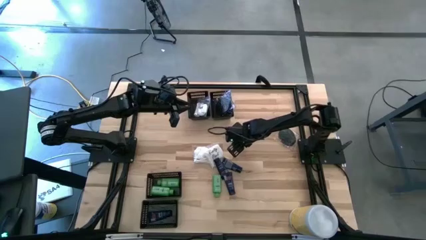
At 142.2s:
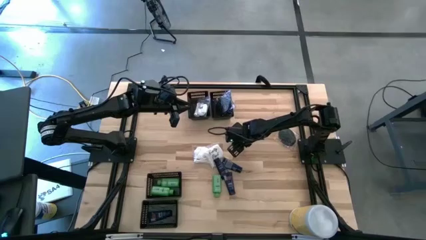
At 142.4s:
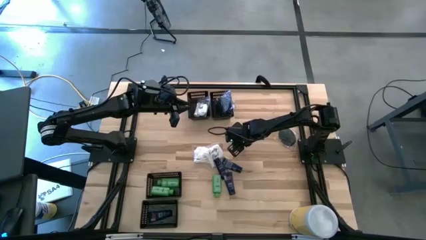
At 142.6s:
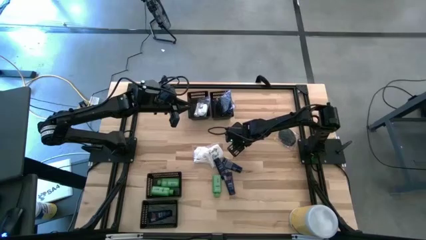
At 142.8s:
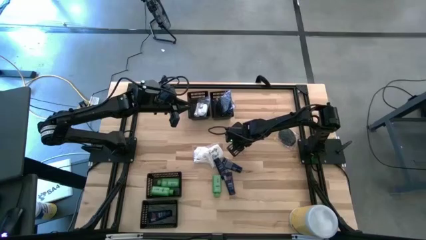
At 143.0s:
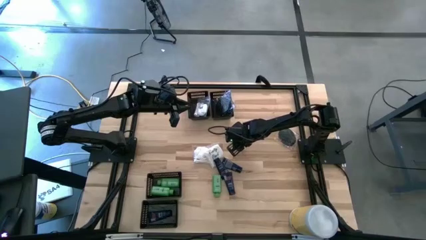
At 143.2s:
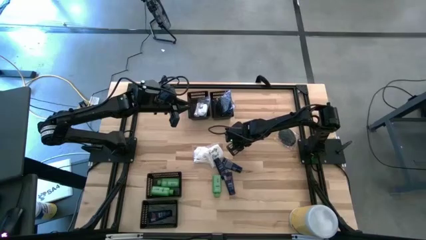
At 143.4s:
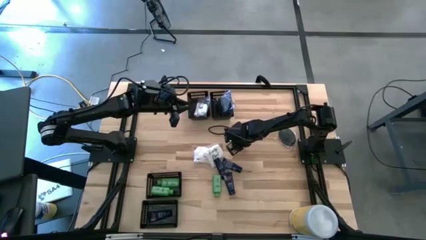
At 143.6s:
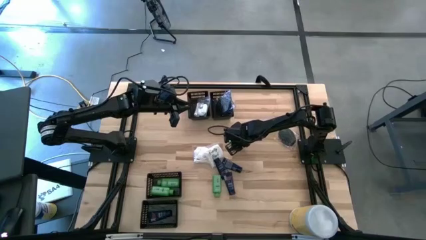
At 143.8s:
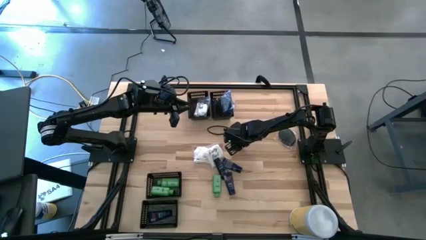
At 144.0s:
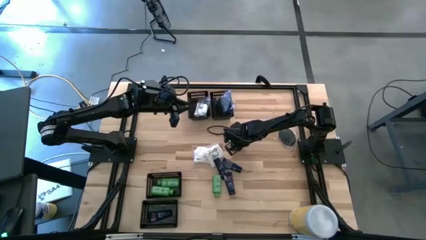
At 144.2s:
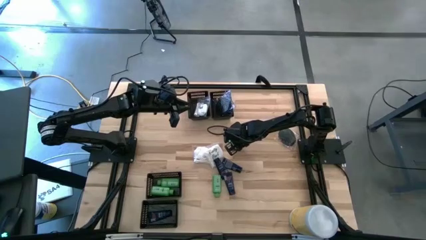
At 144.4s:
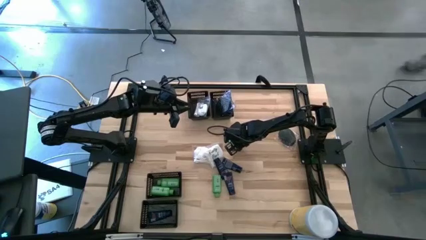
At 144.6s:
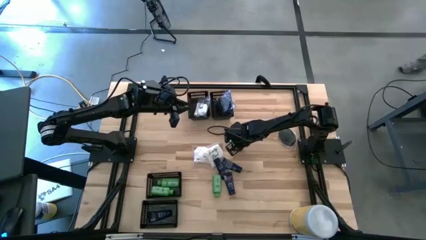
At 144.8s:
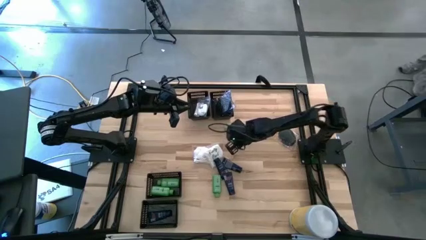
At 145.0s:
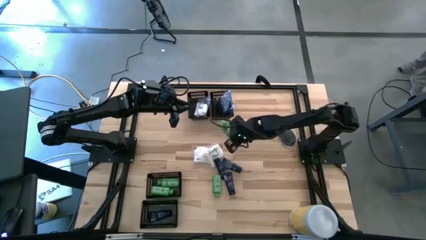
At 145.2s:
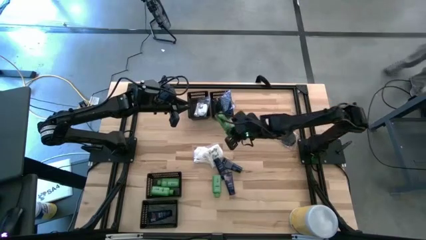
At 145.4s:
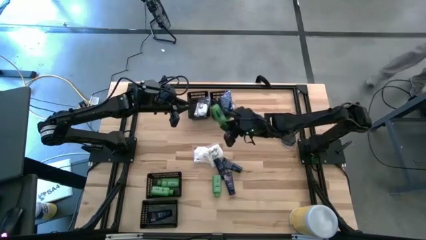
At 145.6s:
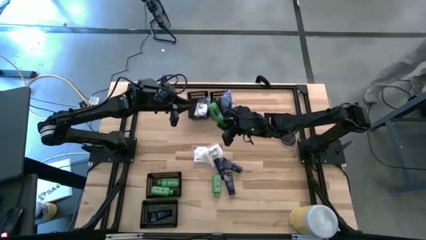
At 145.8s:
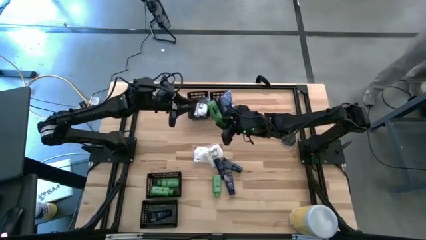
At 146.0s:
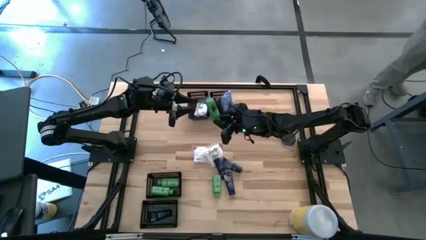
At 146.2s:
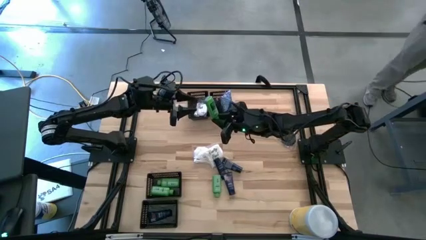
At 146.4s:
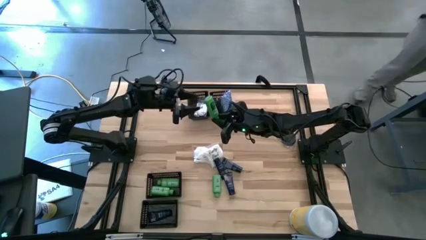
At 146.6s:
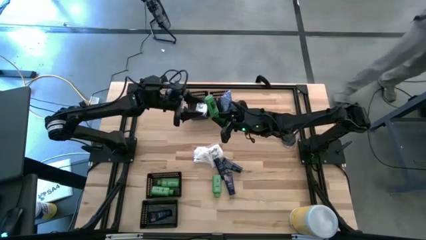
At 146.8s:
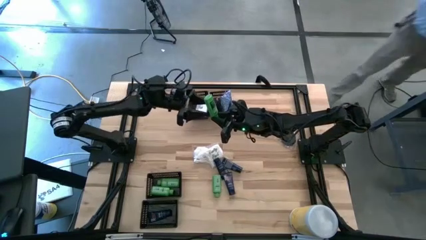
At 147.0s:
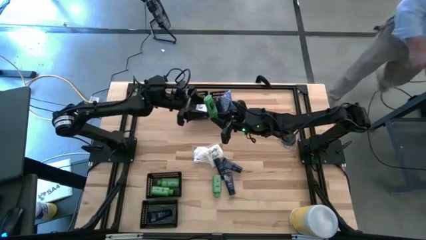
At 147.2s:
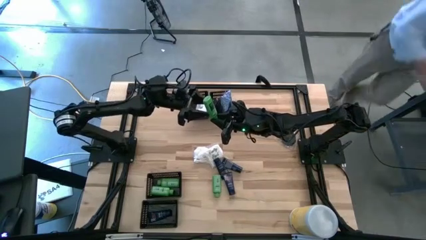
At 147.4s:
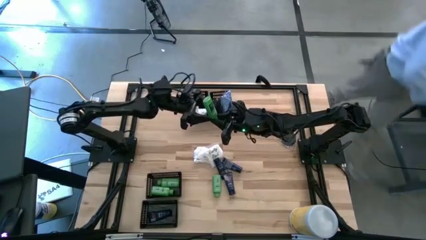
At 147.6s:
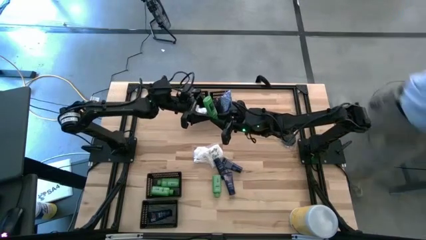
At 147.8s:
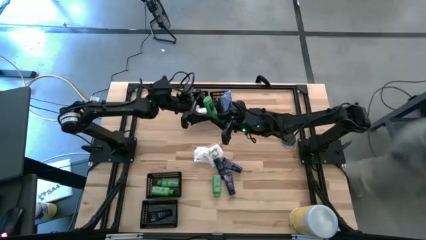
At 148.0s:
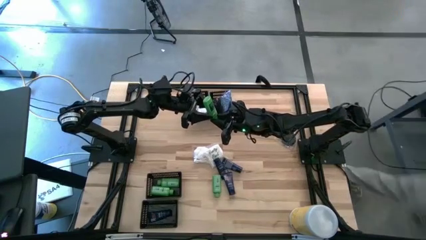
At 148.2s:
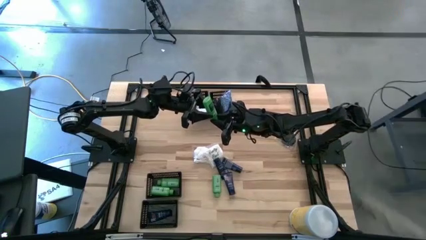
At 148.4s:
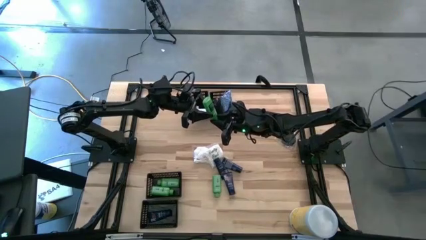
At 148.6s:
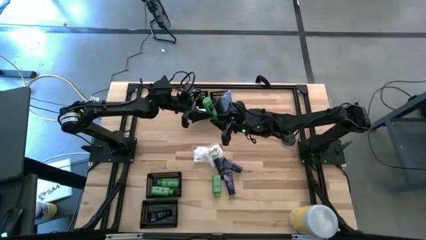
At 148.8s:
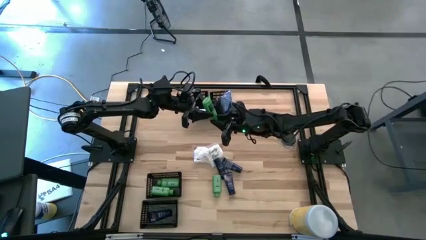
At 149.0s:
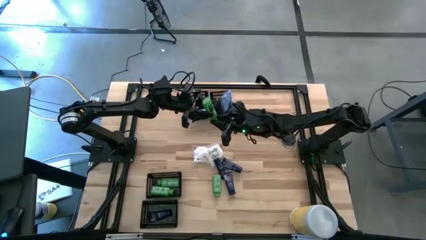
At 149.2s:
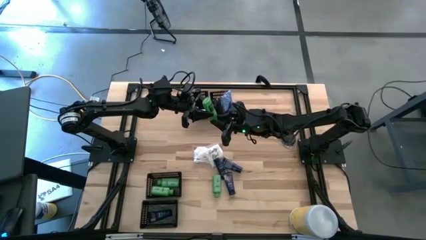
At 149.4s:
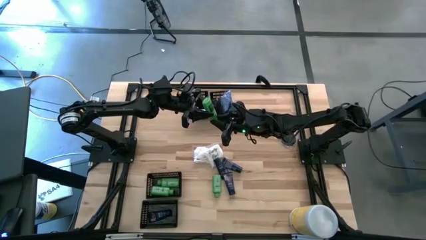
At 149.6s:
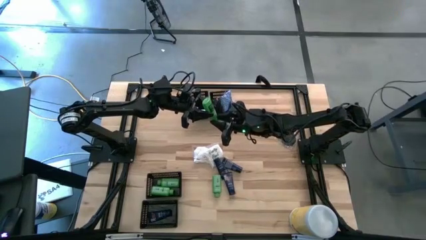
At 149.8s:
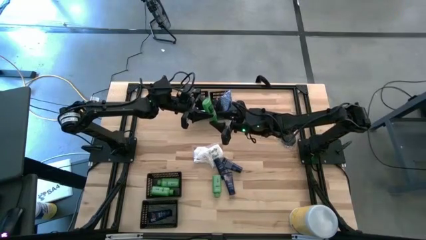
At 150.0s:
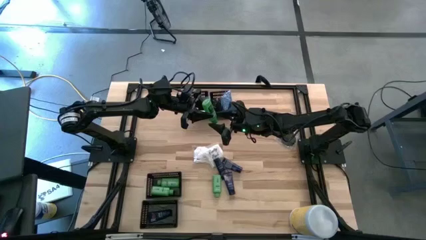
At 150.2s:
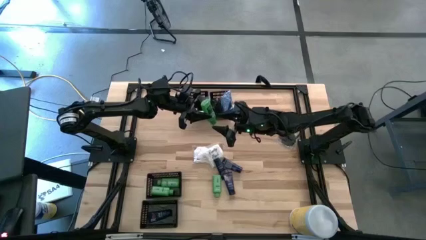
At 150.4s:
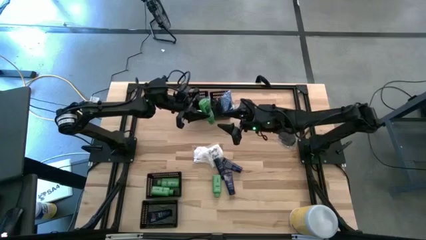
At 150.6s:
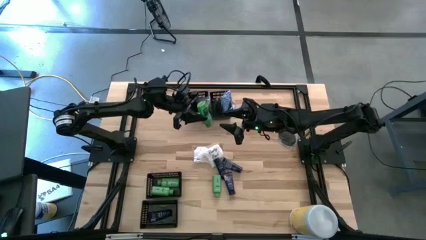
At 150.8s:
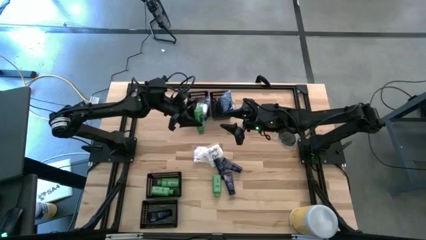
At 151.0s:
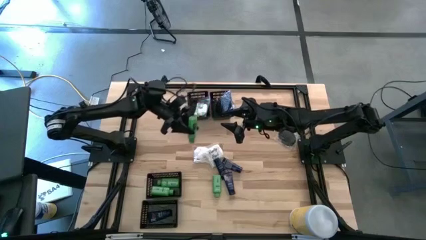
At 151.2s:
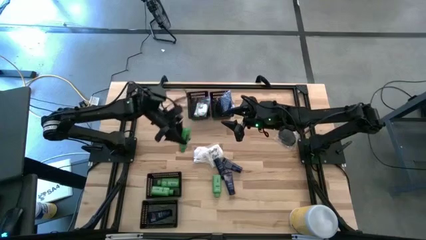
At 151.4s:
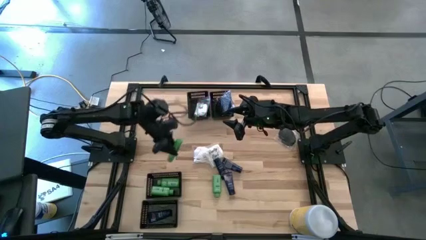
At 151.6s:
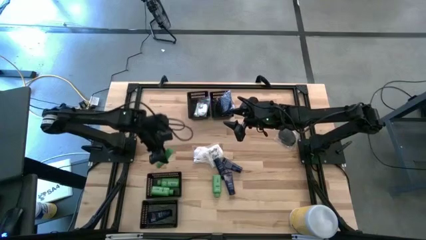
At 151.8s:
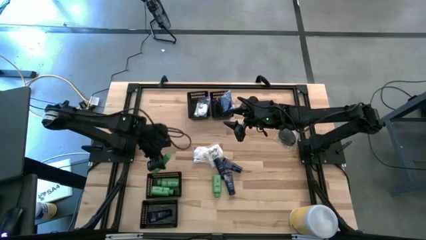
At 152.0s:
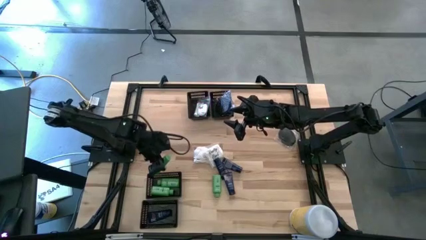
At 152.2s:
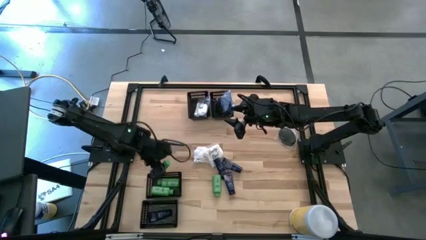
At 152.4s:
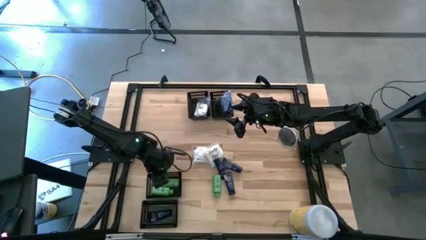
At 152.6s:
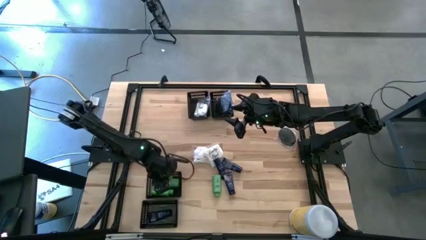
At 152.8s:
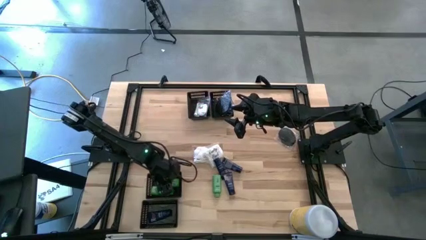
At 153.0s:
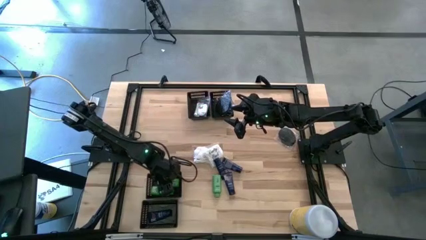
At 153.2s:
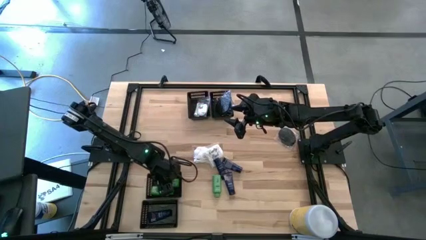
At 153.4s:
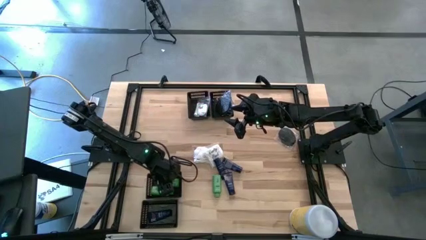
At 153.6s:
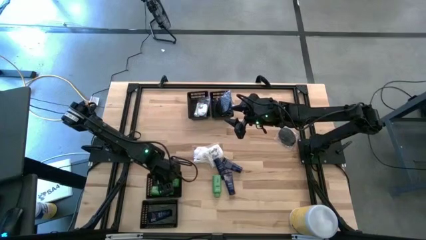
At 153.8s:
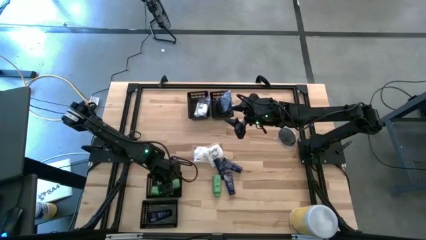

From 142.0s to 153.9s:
Task: Pick & Place Travel size toiletries
Put the green shampoo into the middle left basket
